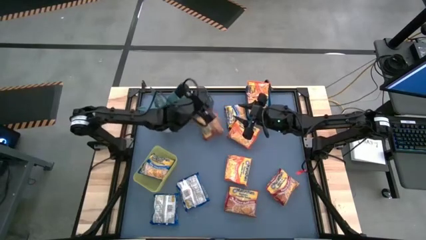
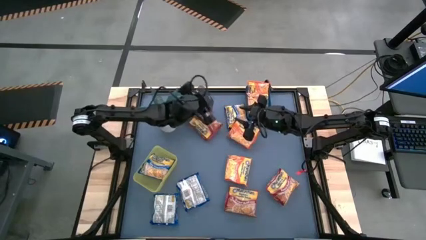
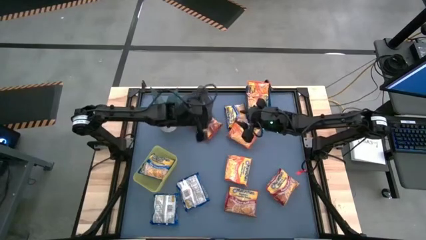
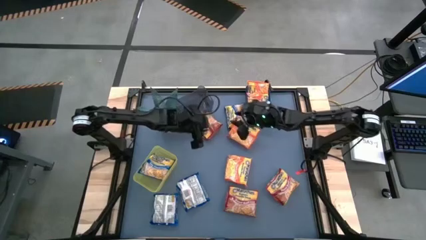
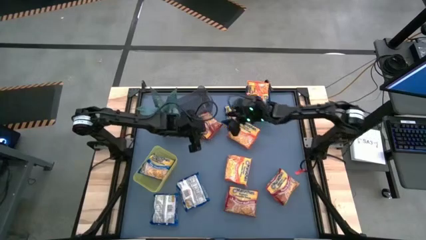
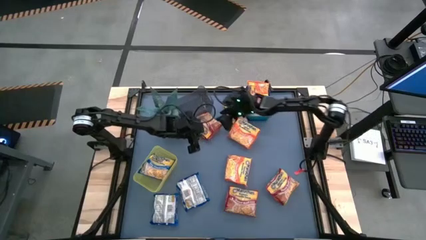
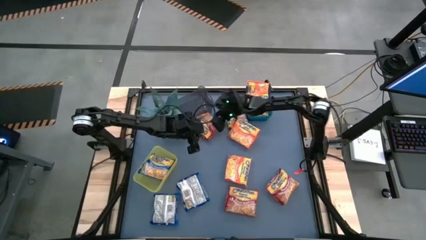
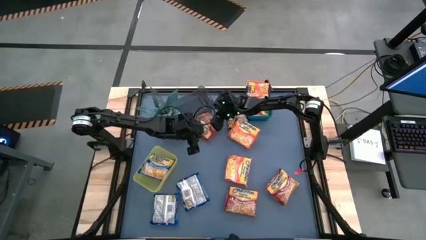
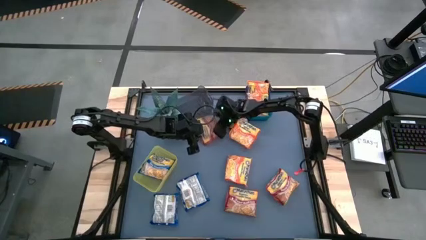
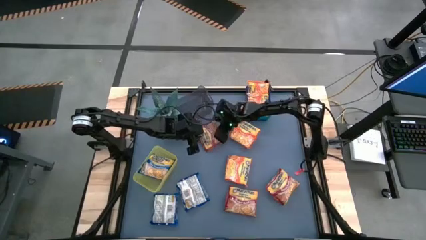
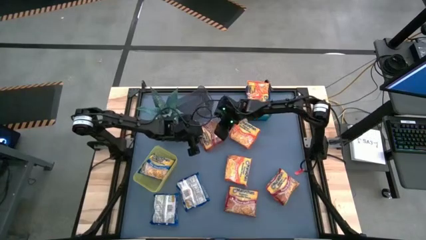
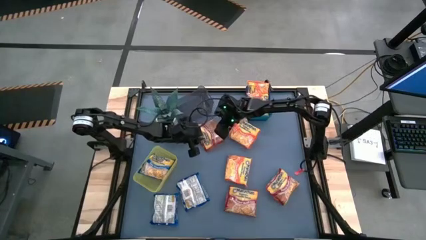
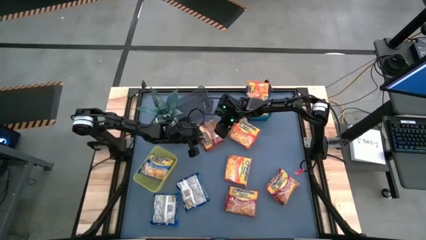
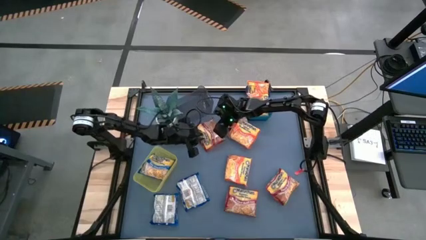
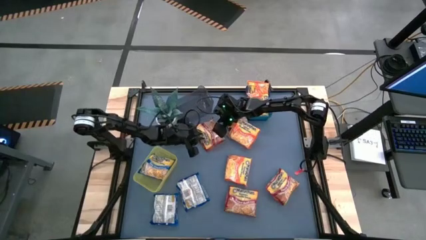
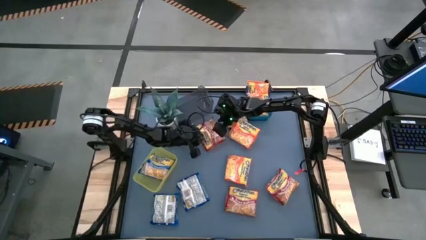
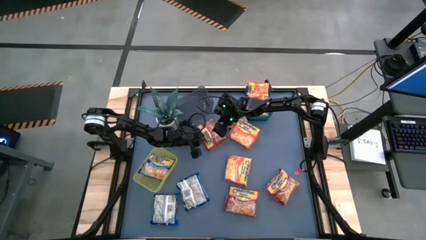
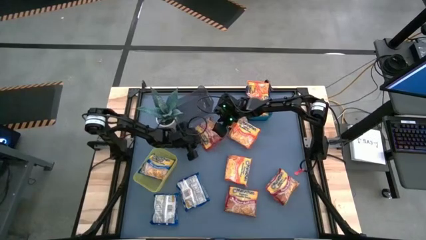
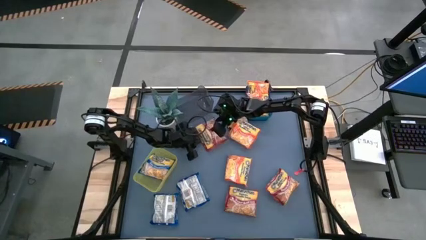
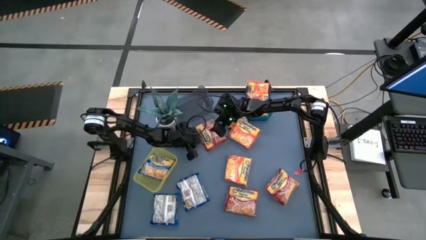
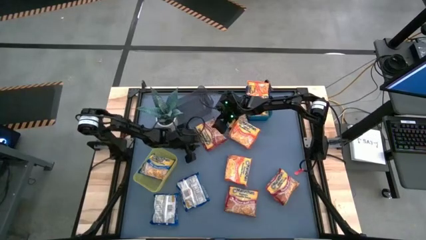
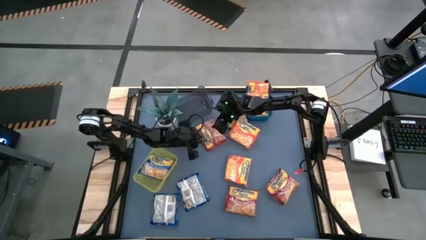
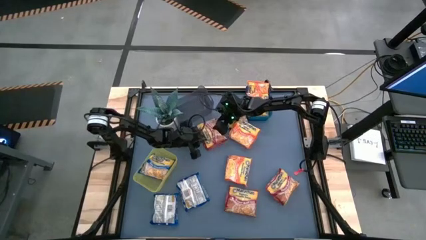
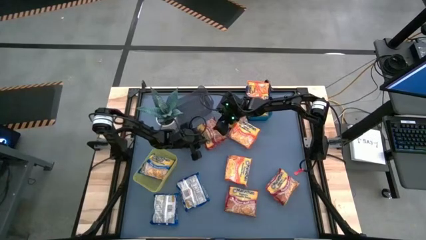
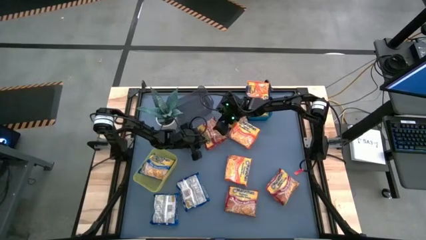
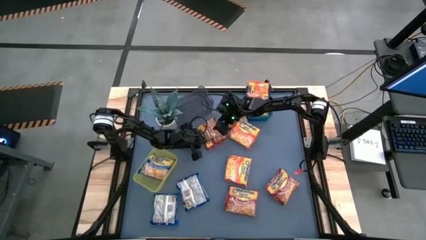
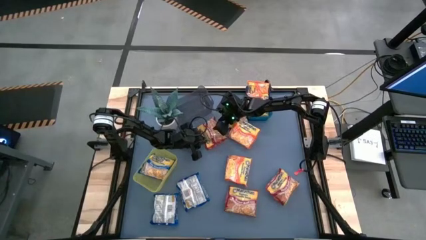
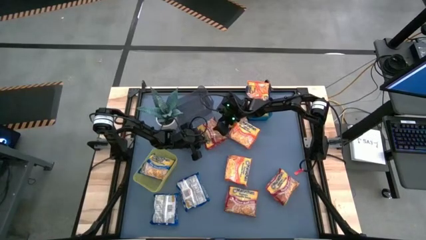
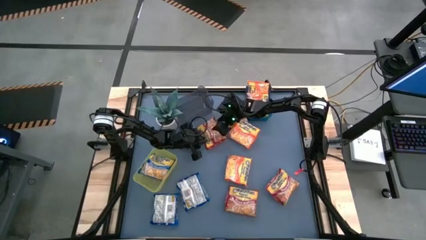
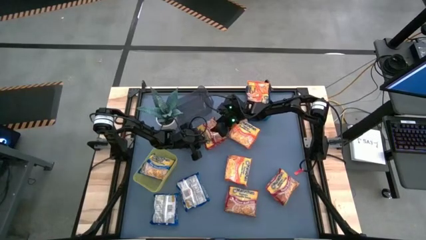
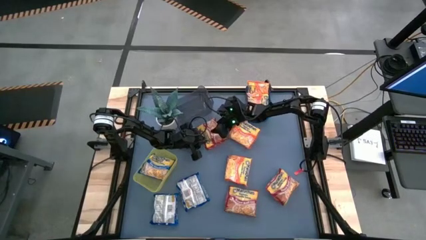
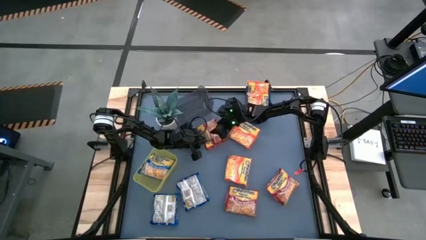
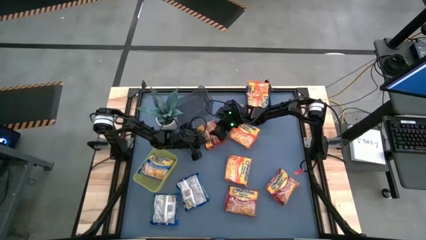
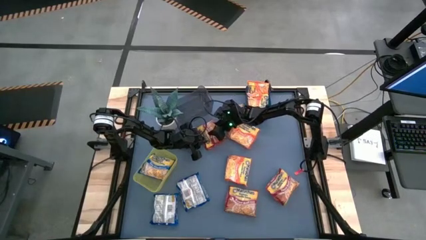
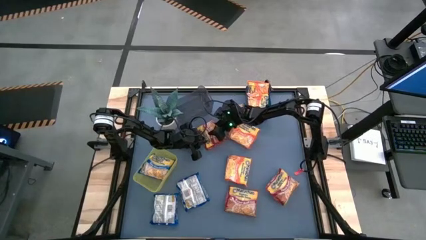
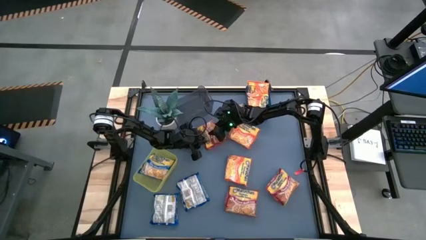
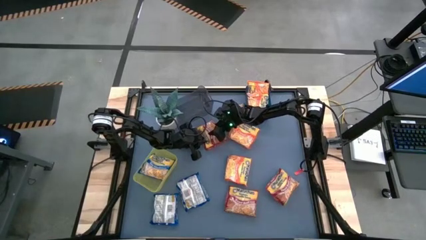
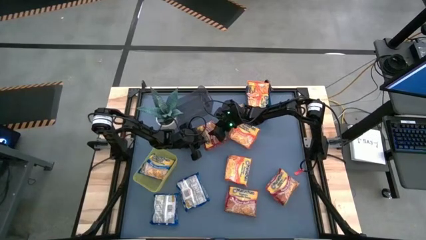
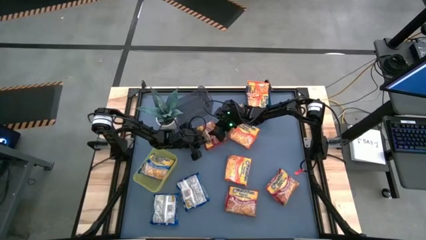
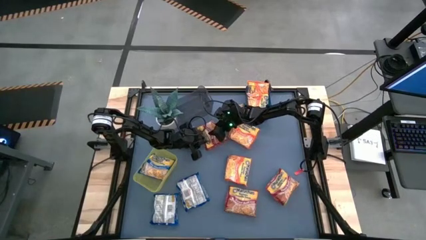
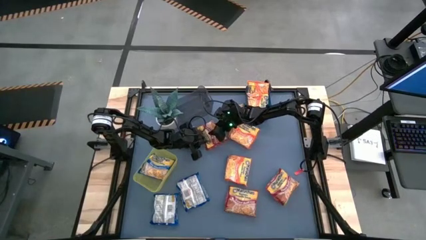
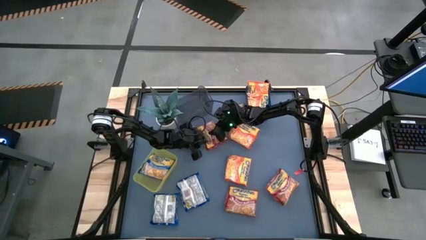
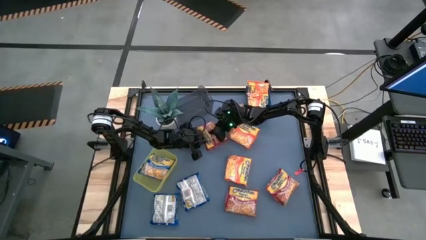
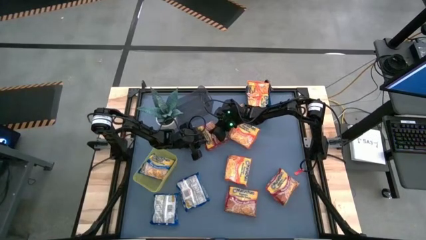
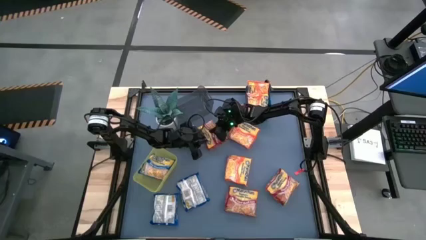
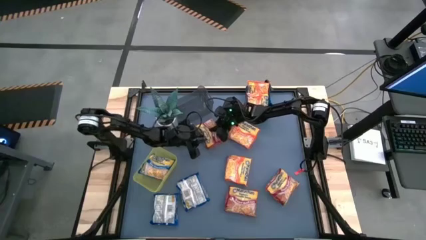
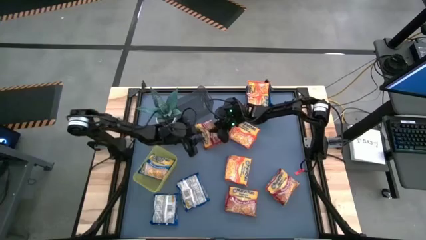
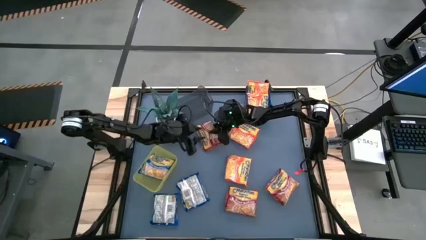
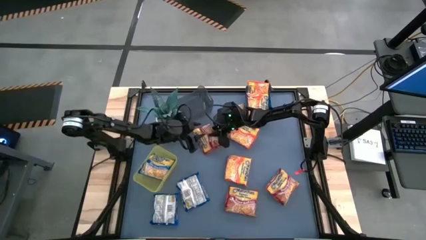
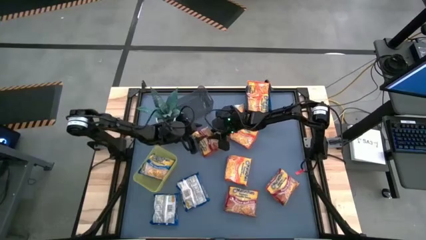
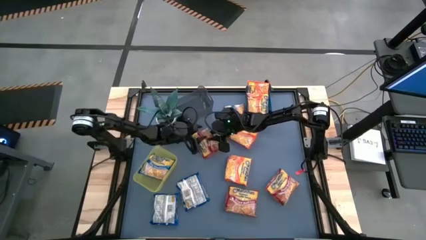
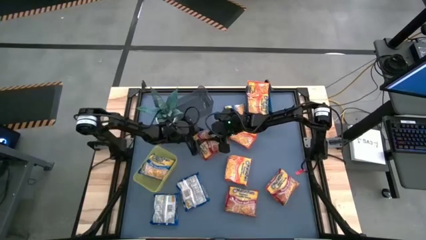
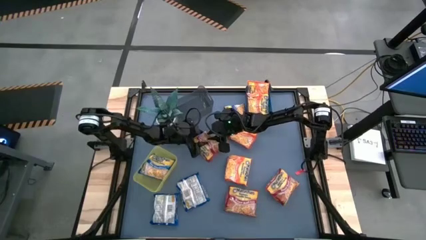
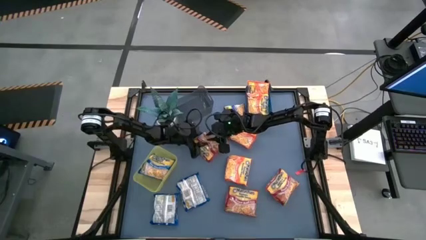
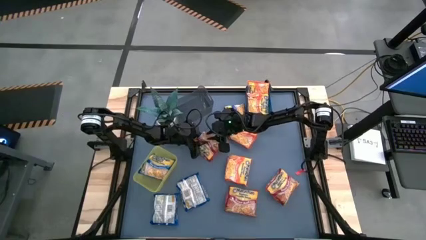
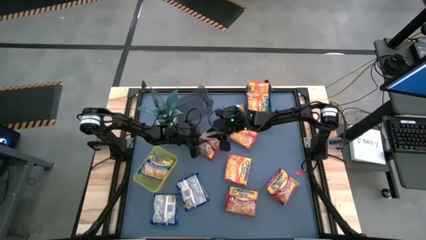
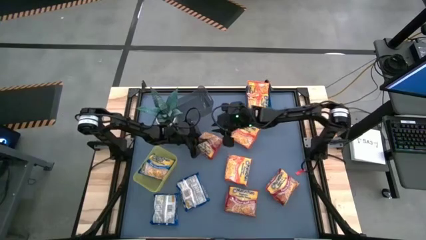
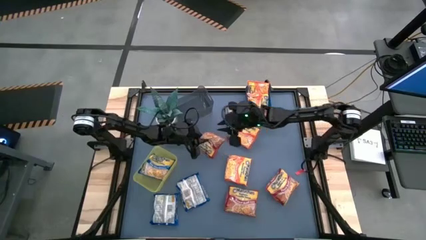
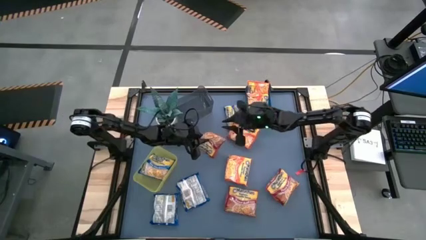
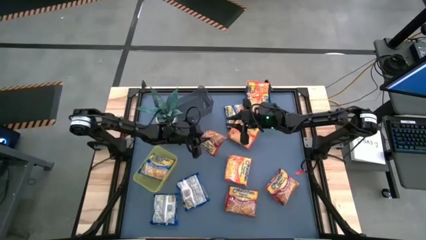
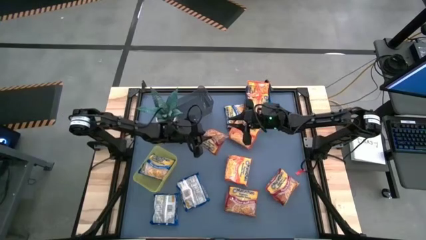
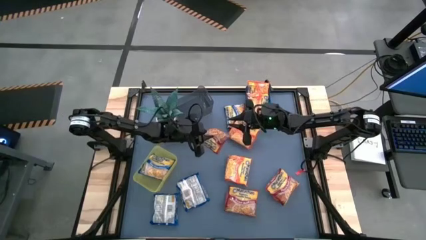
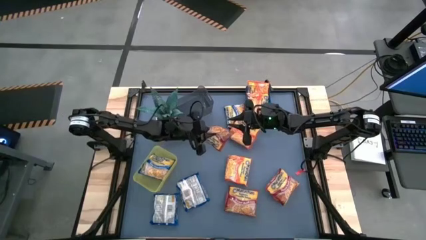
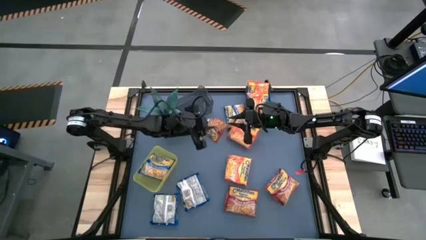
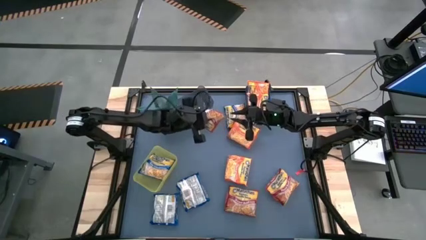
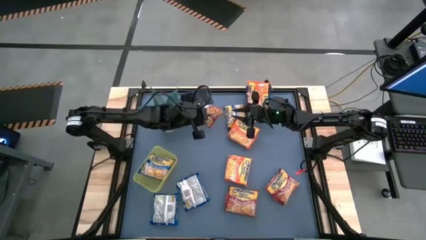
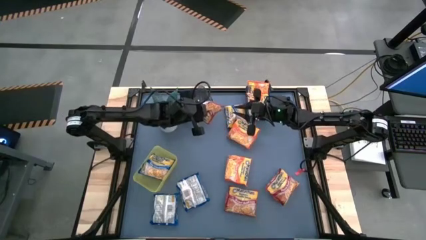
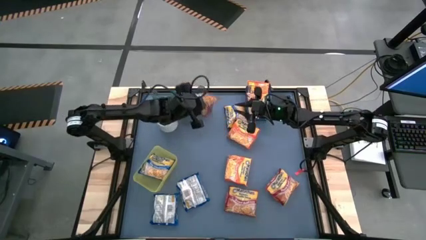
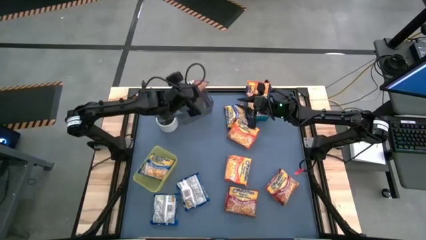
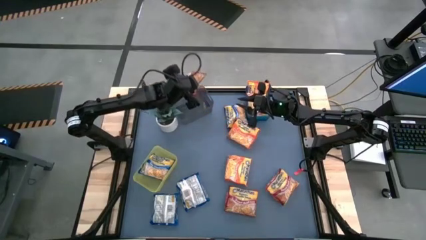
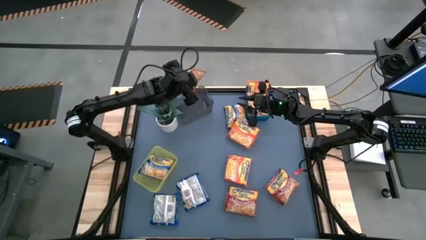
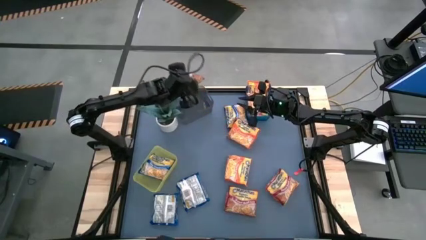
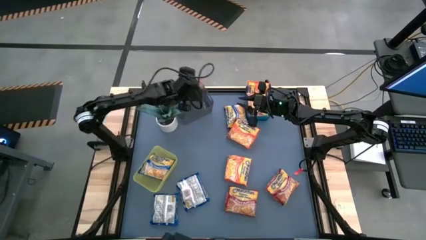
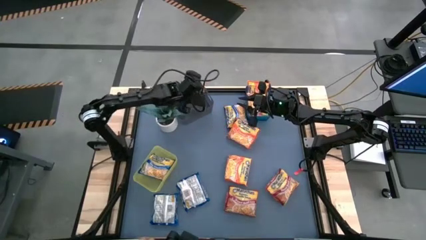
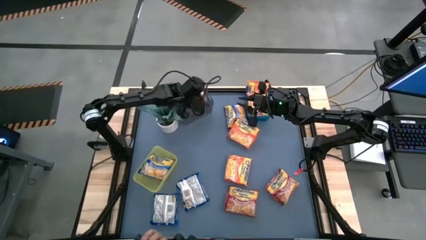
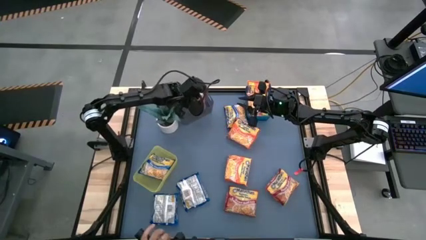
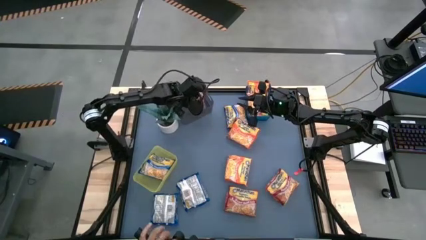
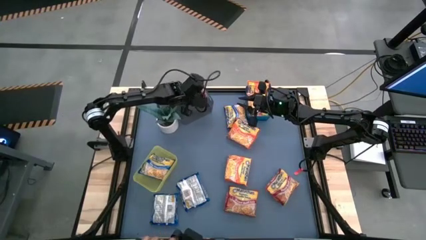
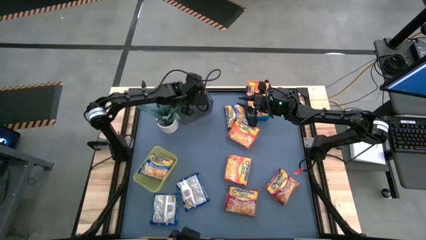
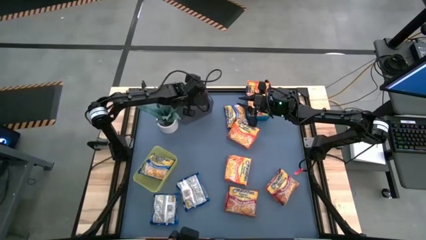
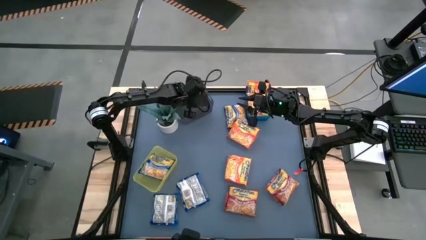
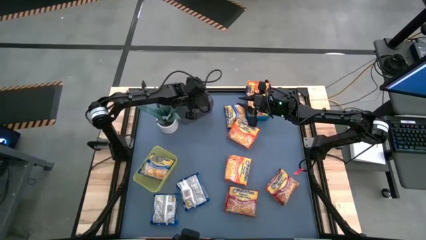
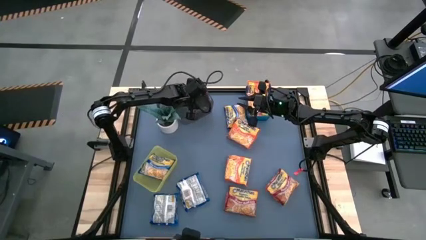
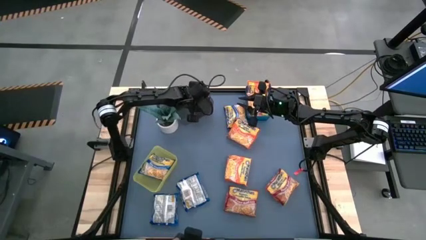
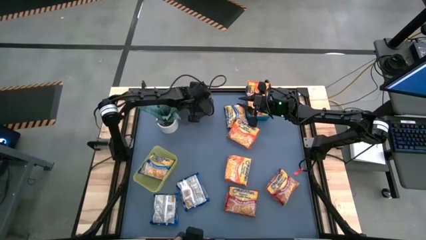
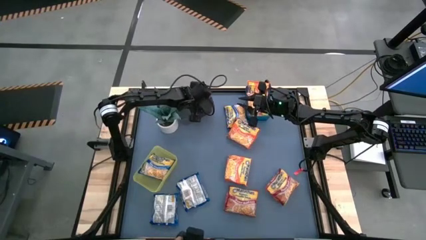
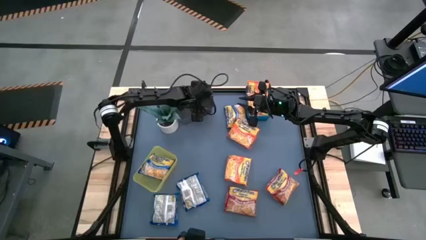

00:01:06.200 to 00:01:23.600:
Task: Sort Maruchan noodles
Put the red noodle pack into the black bin
